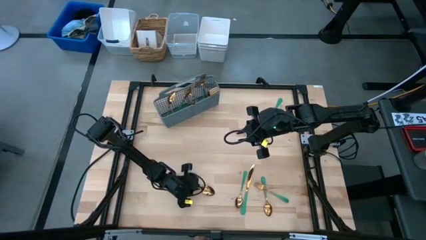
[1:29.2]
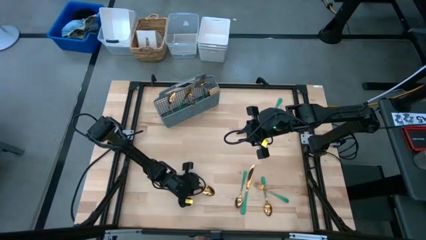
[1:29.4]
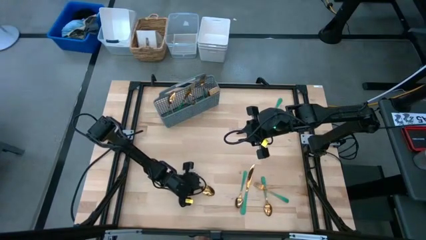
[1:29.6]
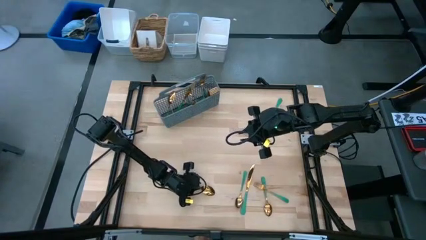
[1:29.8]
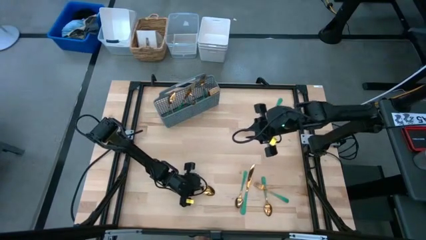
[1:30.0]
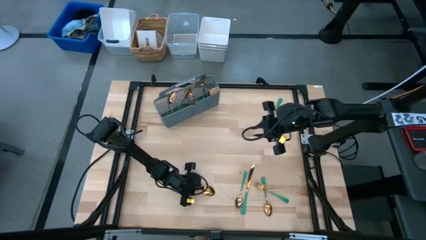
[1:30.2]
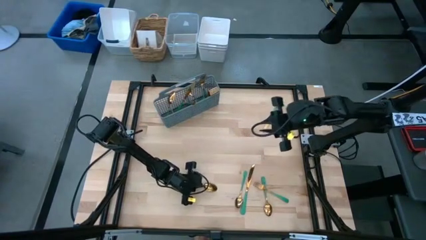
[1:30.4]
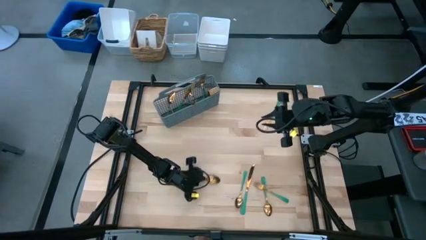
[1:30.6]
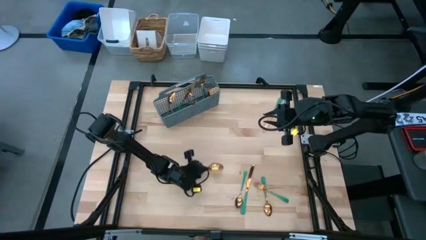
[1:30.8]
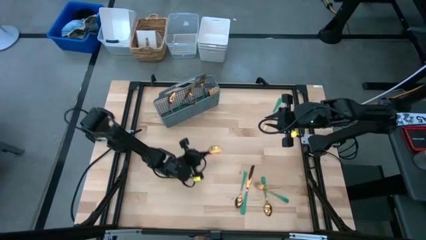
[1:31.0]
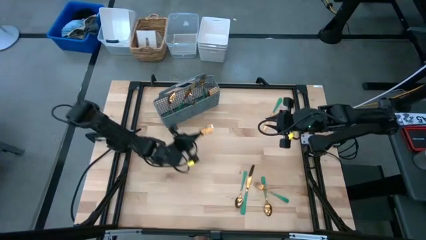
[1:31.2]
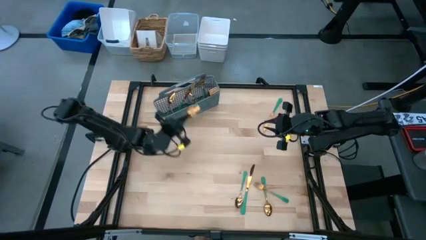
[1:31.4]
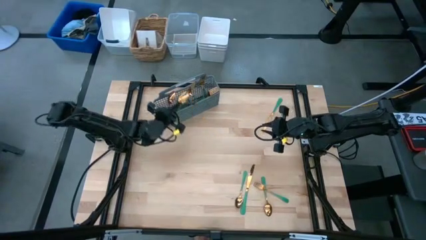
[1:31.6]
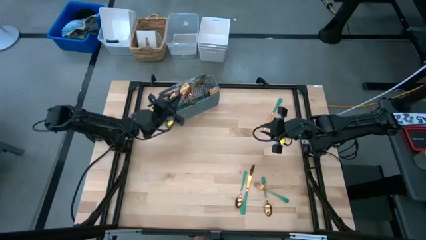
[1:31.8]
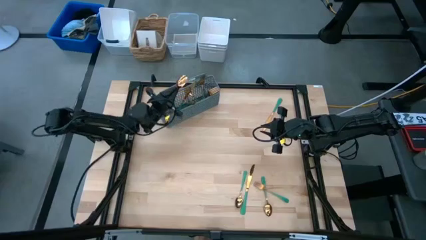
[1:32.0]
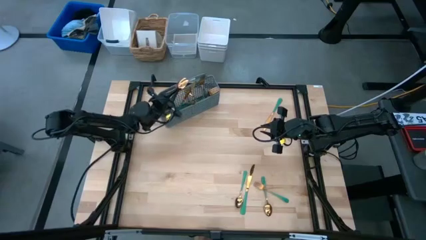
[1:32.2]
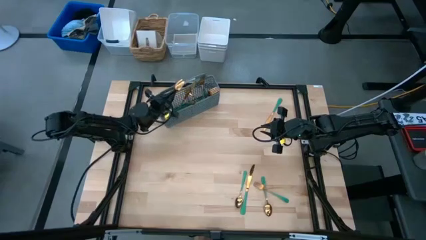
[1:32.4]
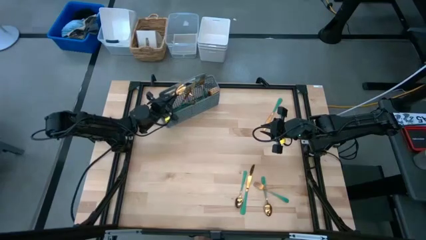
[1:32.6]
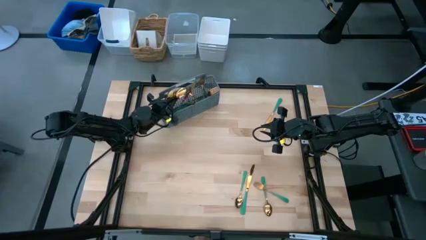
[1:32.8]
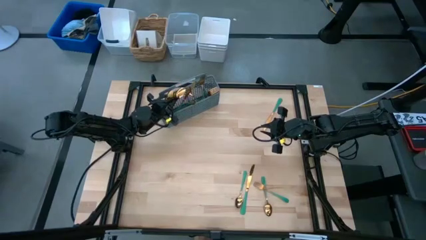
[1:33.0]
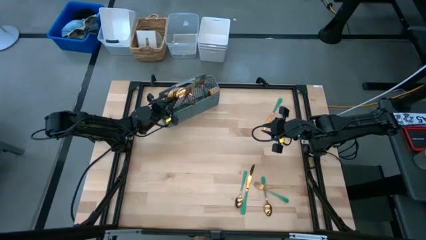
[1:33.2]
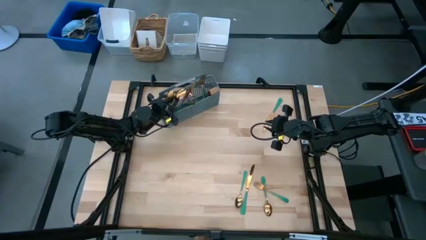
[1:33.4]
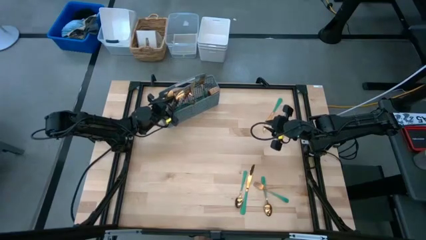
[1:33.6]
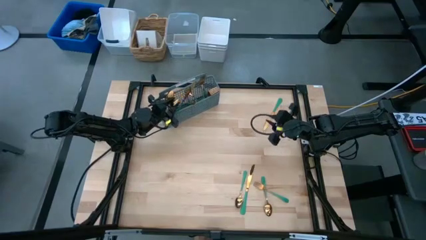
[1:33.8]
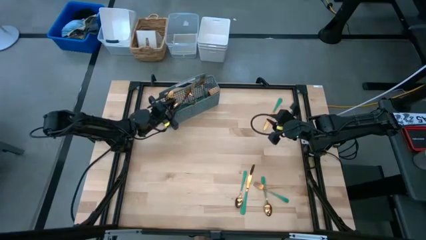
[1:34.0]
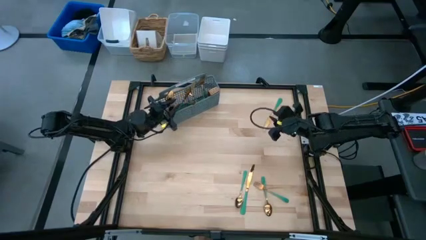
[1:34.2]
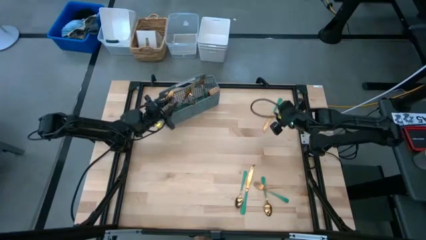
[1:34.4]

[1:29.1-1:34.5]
Task: Sort silverware
Put the spoon into the left section of the silverware holder

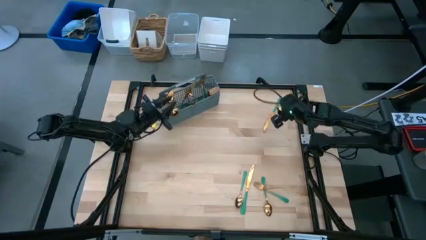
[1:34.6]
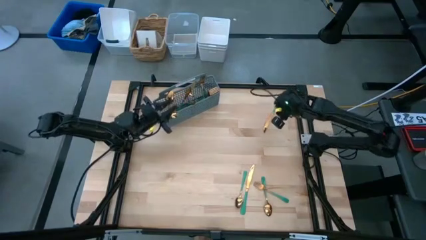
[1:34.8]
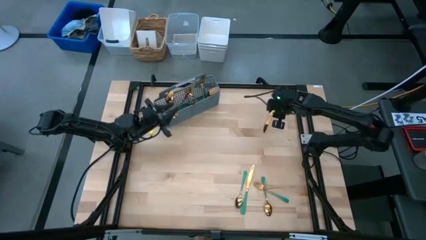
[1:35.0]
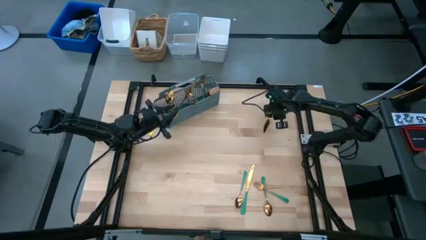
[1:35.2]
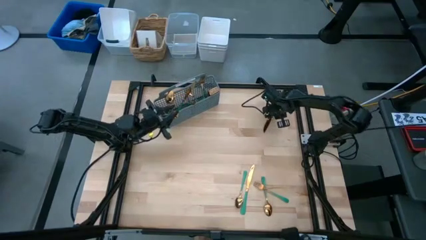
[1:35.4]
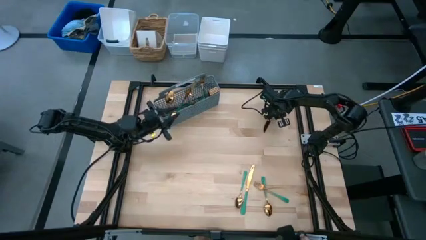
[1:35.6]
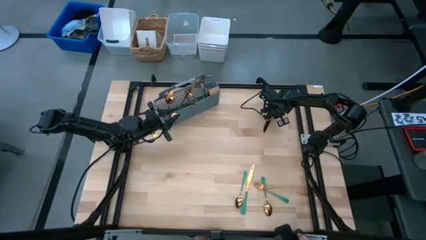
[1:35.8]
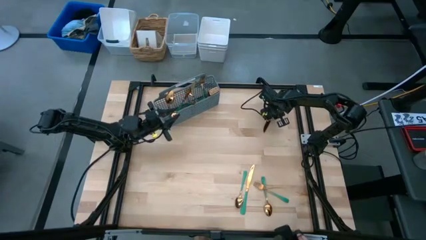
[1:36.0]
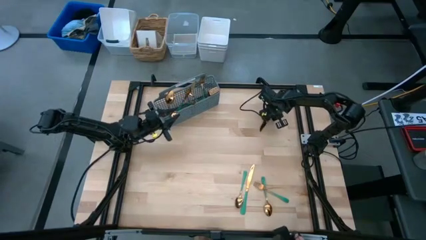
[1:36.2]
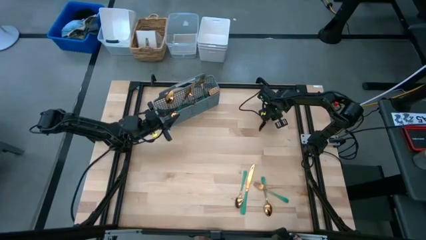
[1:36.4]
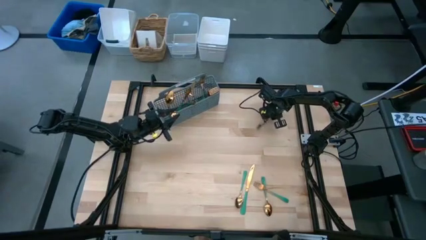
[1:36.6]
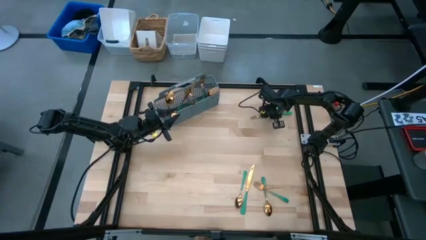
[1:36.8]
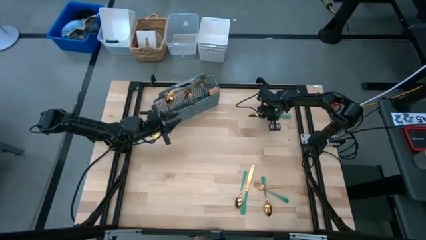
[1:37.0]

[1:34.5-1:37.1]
Put the knife into the middle left section of the silverware holder

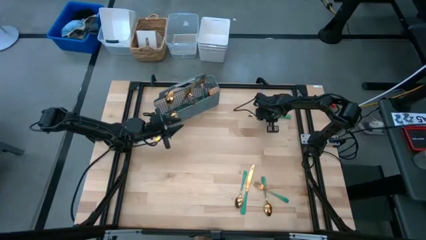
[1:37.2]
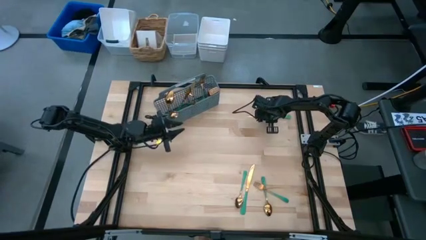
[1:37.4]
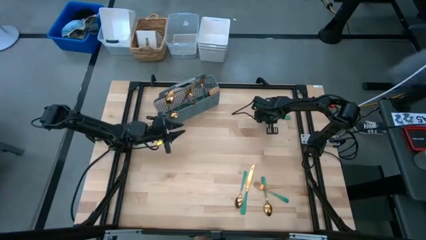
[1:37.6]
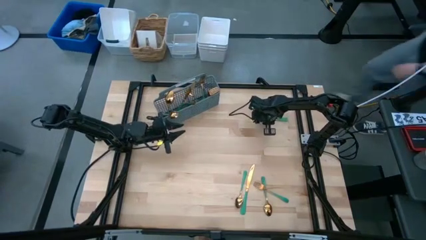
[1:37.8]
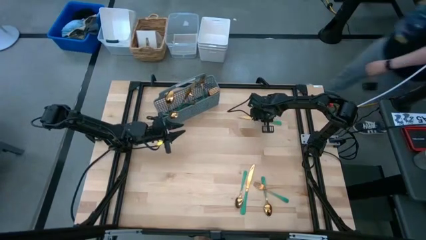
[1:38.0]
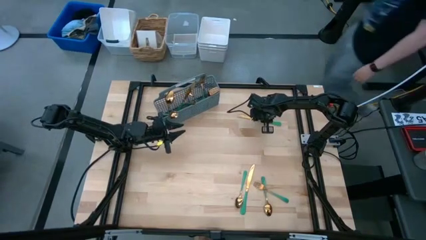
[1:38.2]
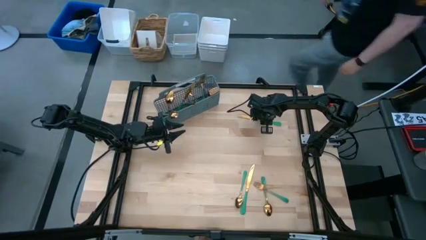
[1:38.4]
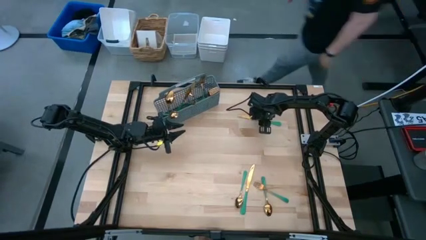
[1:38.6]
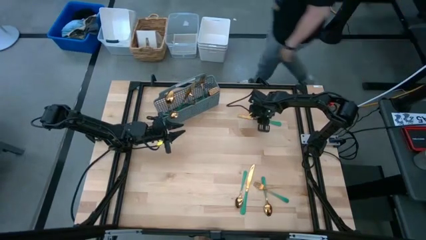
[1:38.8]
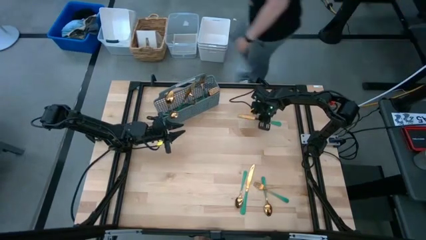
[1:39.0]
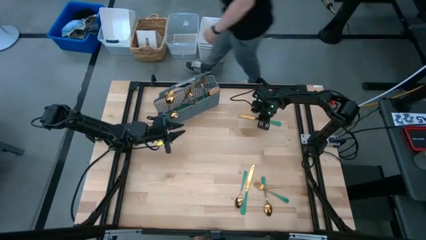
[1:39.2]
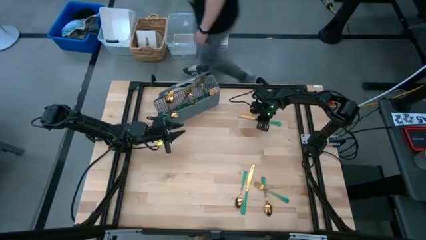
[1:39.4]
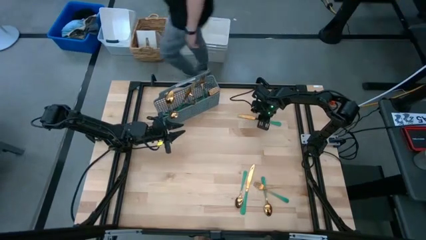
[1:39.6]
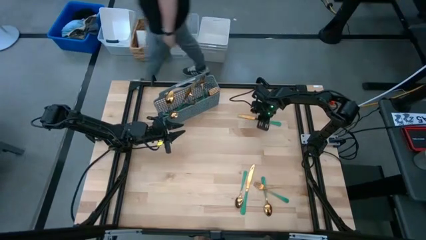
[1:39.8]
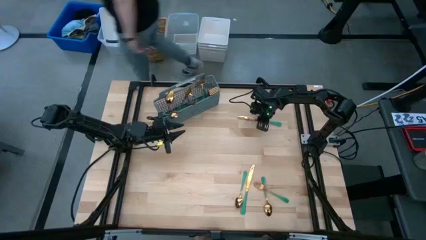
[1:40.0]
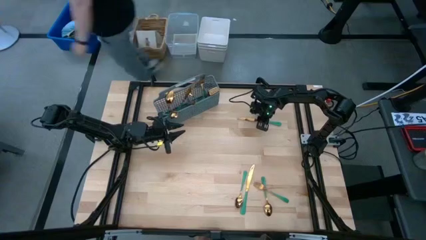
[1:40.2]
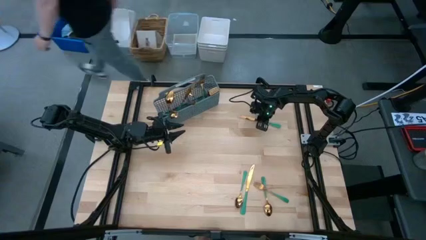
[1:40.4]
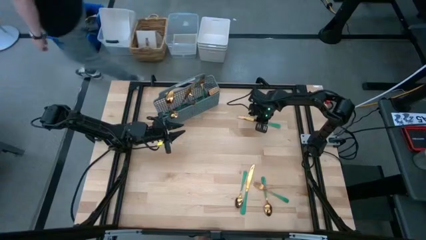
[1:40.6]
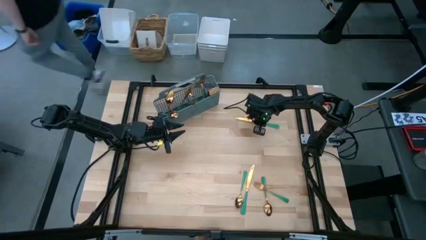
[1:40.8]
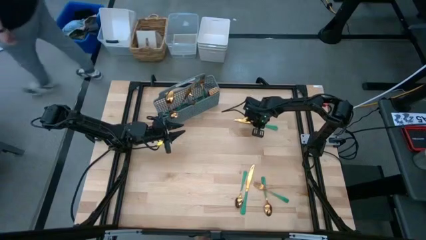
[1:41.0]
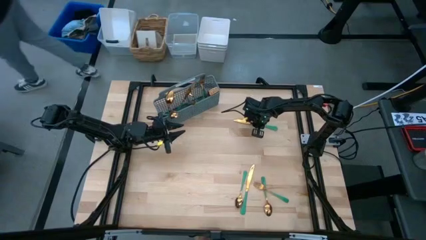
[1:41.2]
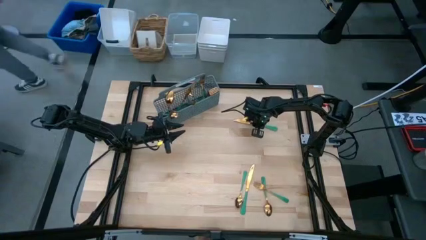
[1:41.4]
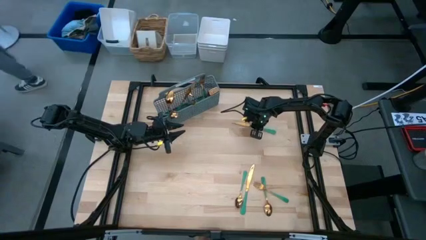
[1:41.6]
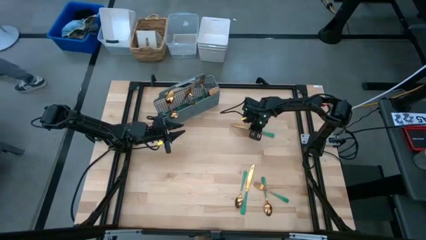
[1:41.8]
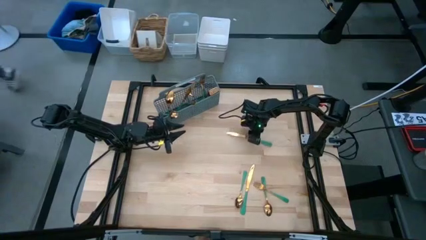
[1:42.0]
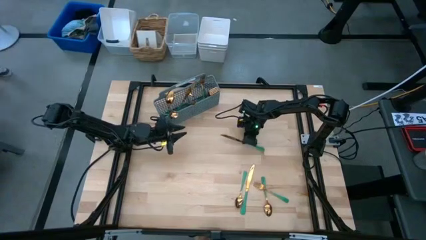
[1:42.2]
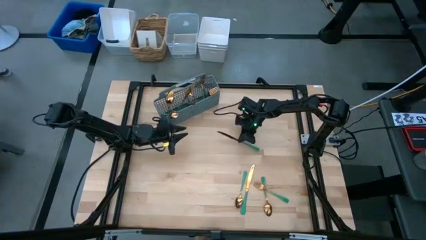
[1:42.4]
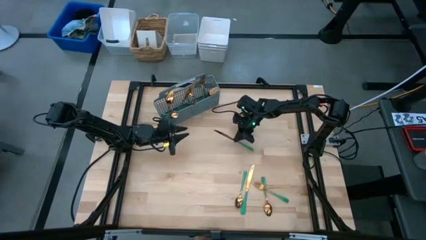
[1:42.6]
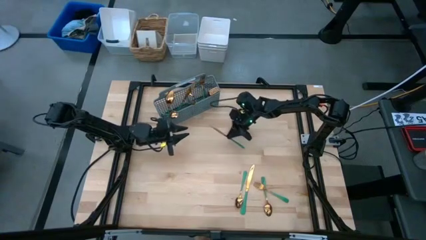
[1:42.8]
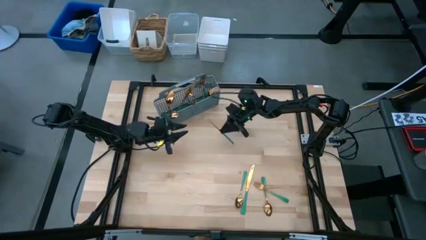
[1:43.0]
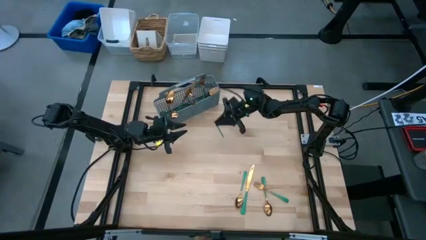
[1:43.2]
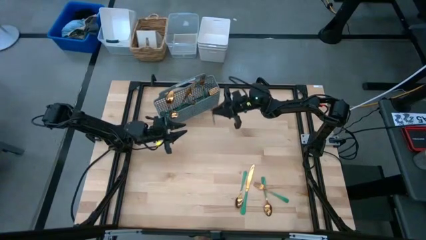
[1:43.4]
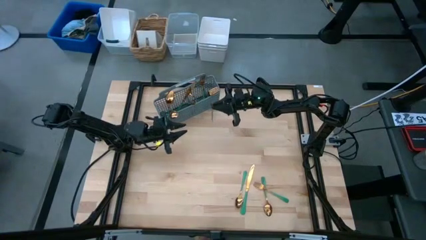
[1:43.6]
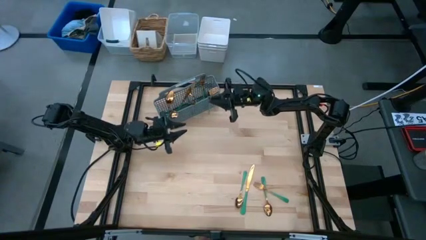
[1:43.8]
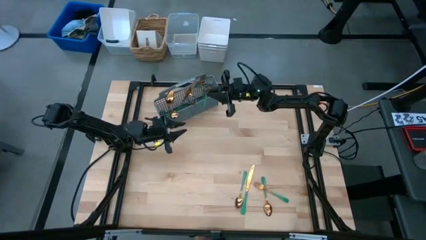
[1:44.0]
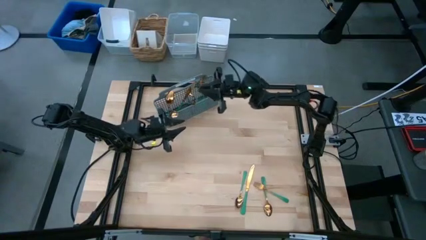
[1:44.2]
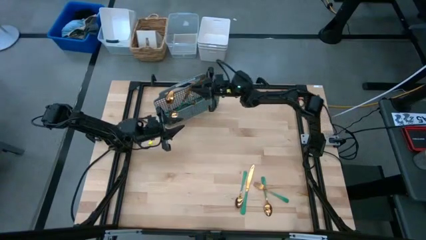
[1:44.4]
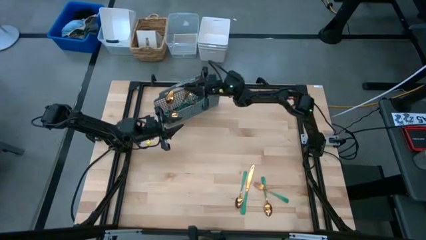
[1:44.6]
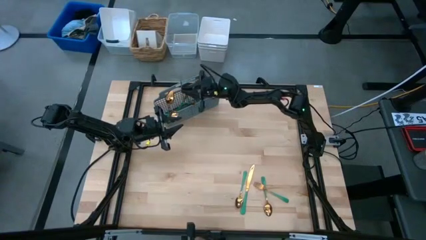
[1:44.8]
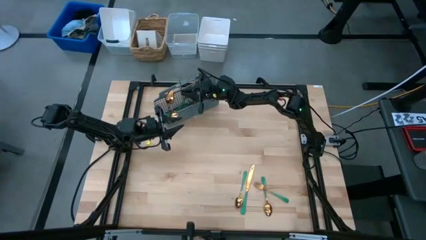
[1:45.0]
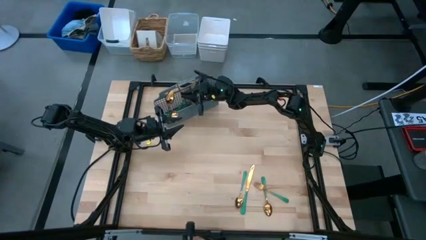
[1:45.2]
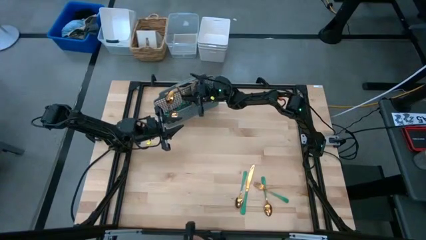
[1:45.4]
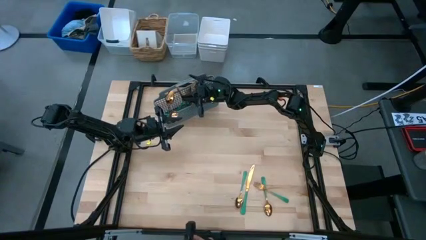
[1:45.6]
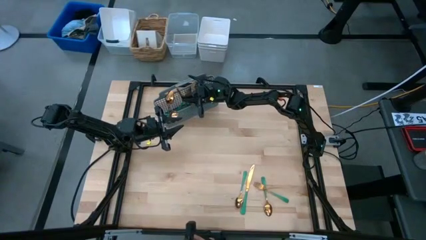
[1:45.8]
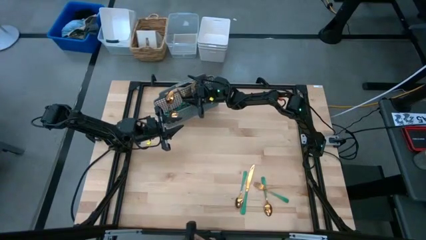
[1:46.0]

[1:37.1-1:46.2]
Put the knife into the middle left section of the silverware holder
